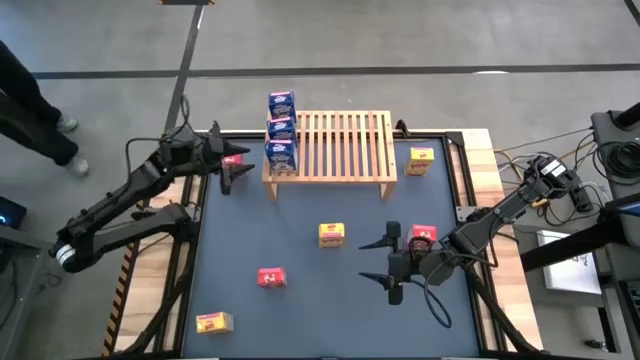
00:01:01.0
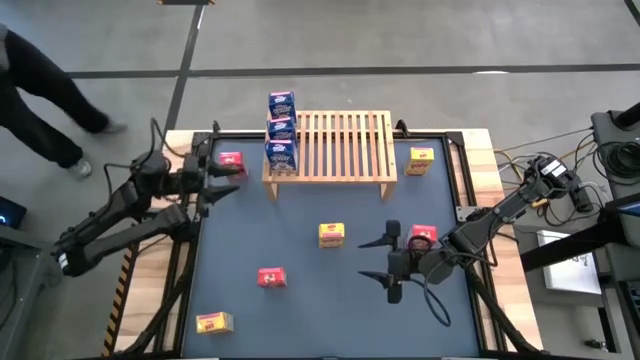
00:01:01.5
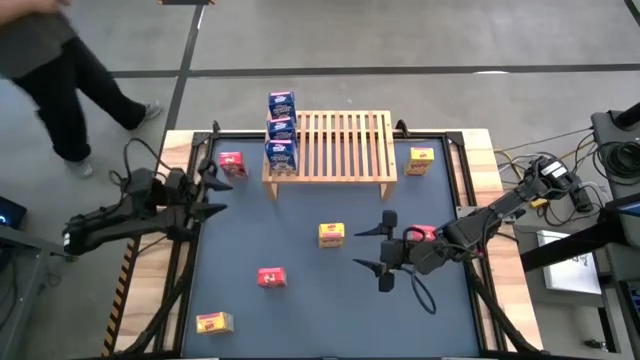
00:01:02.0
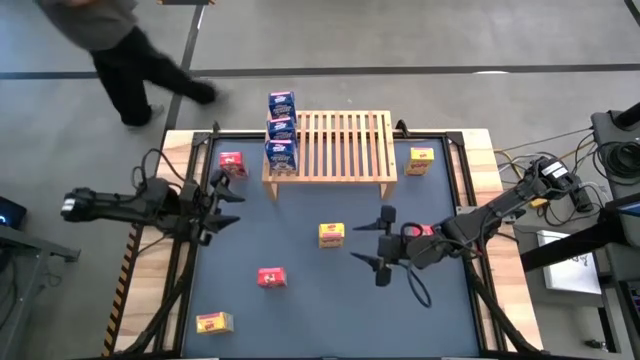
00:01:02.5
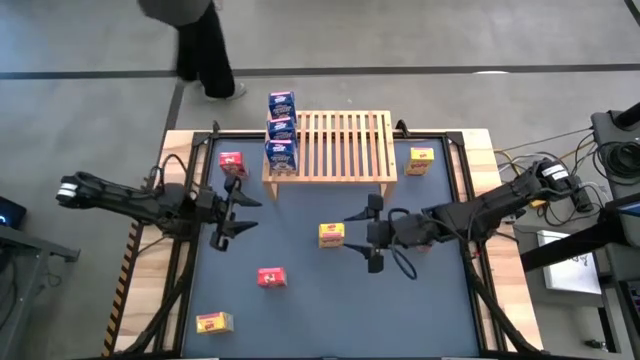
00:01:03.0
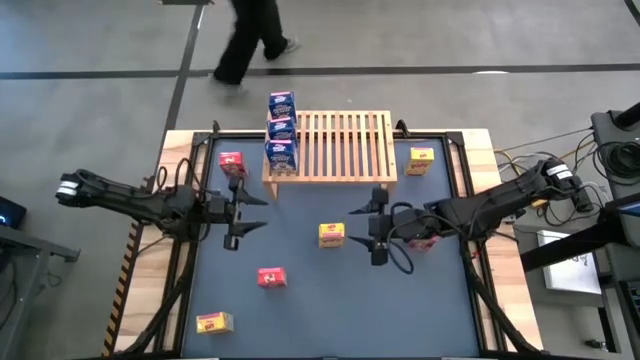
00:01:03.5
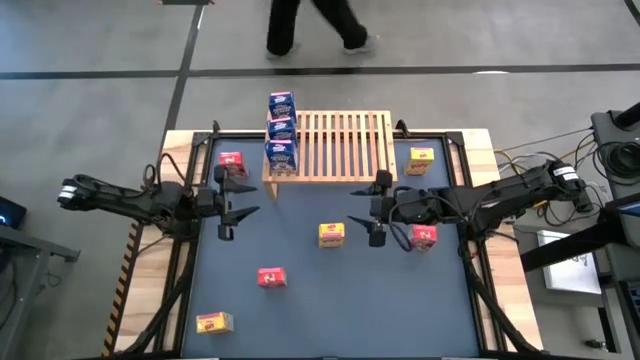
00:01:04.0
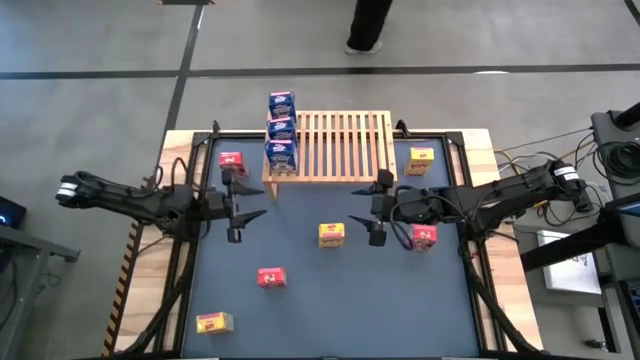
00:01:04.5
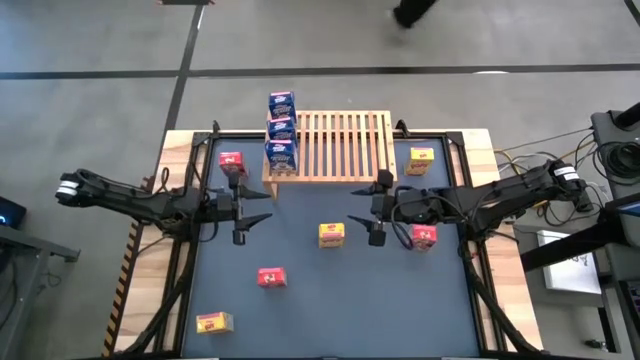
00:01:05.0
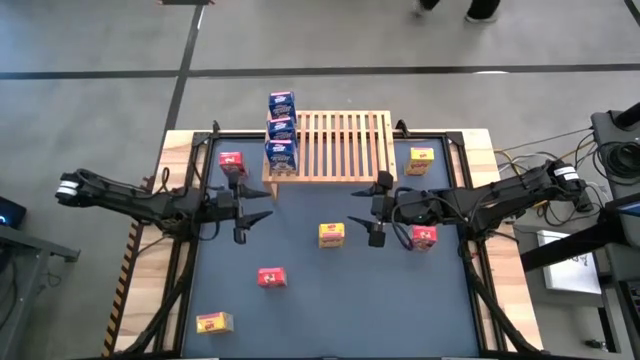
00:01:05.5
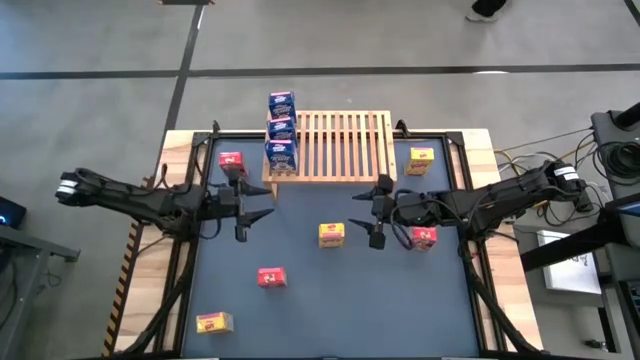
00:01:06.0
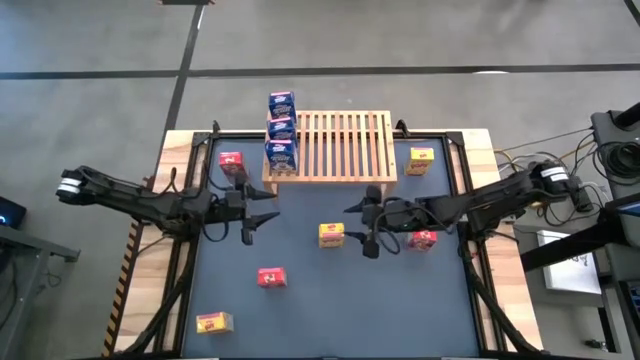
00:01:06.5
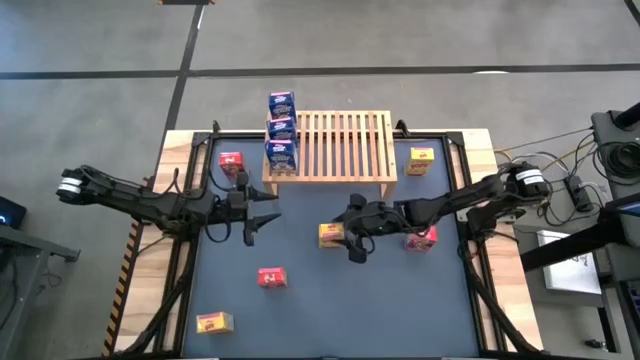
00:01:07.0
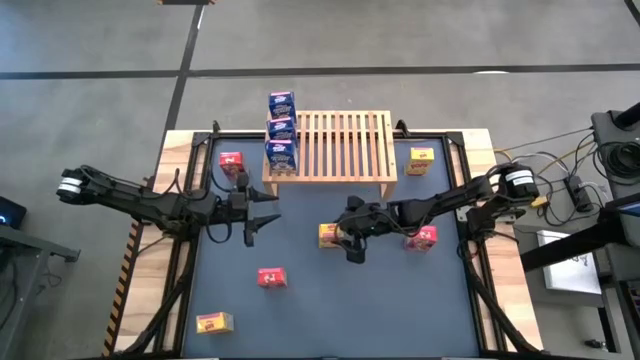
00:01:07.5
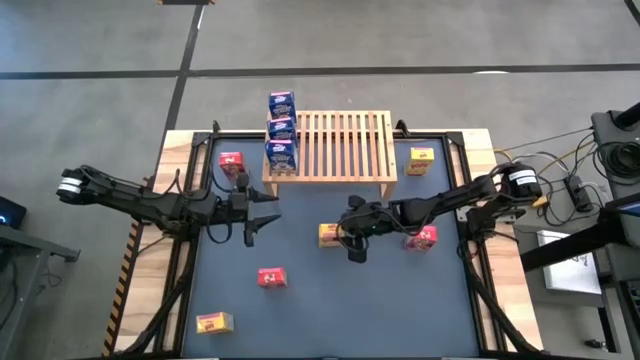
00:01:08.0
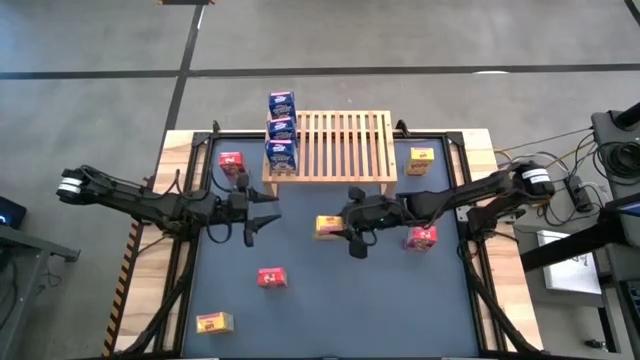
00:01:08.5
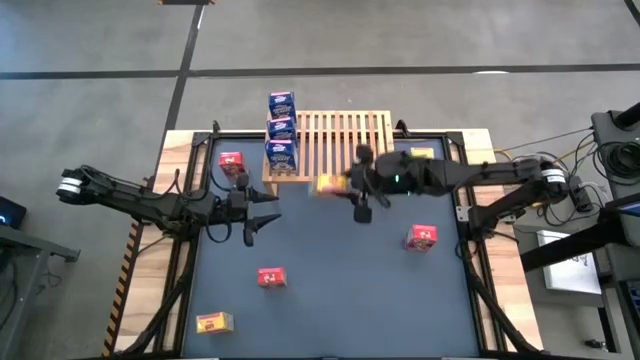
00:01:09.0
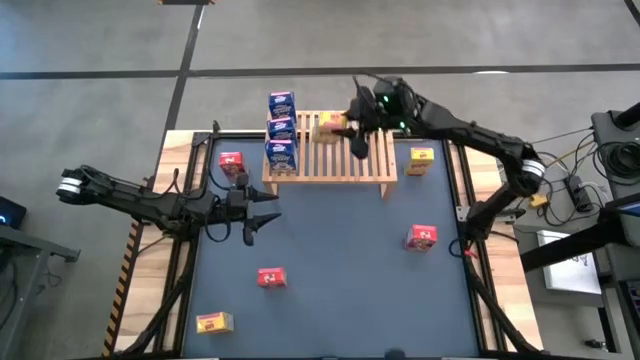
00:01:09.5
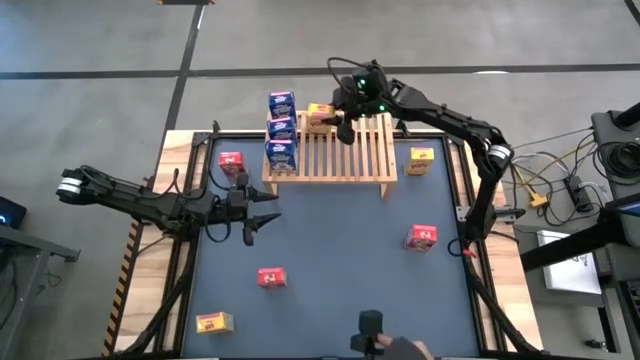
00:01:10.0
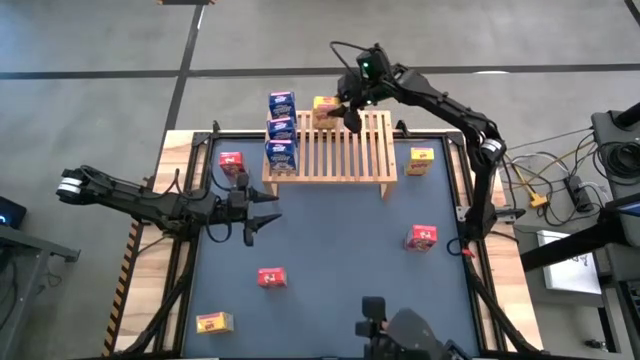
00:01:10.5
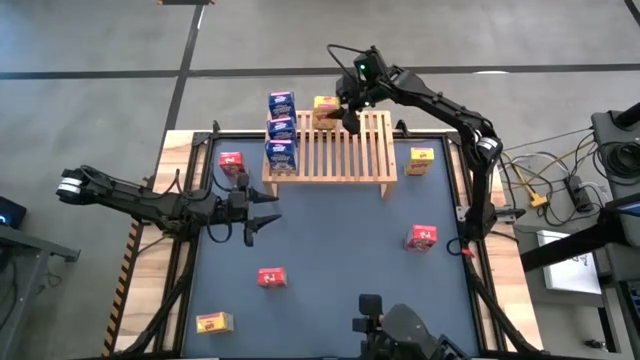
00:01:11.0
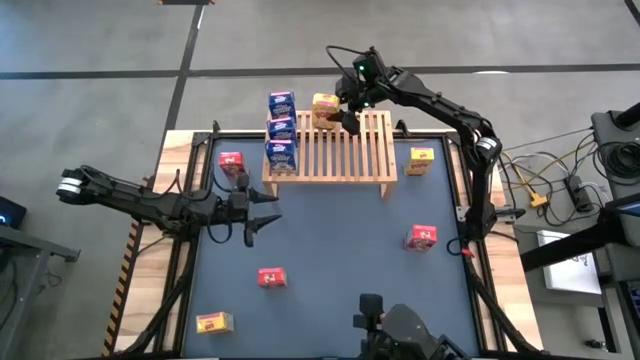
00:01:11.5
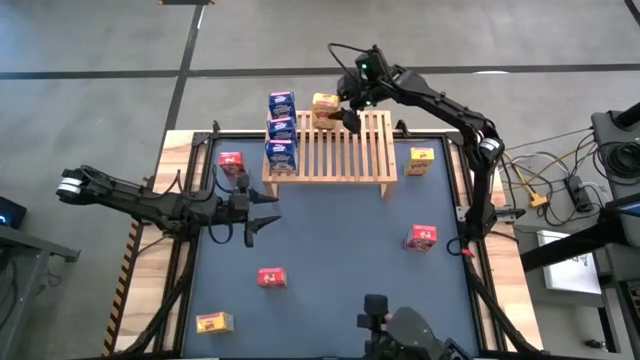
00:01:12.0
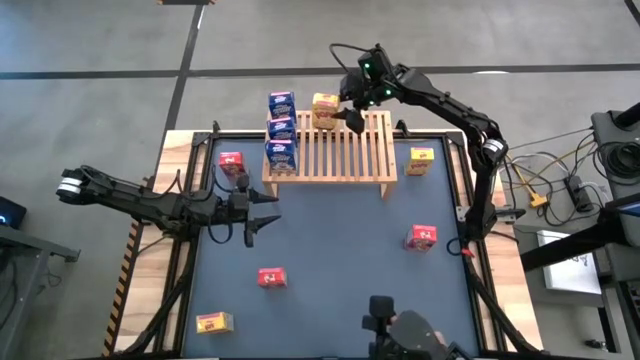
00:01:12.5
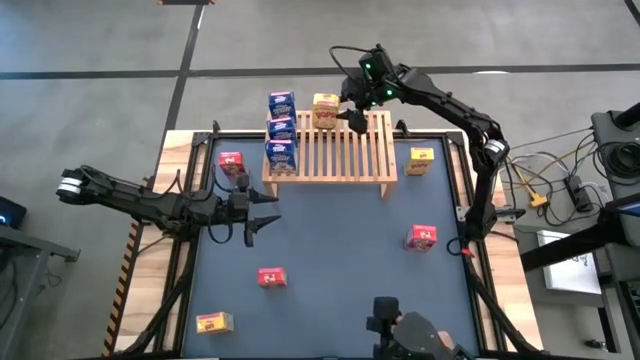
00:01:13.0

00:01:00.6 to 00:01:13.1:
Task: Stack cereal on shelf
Put the middle yellow cereal box on the shelf

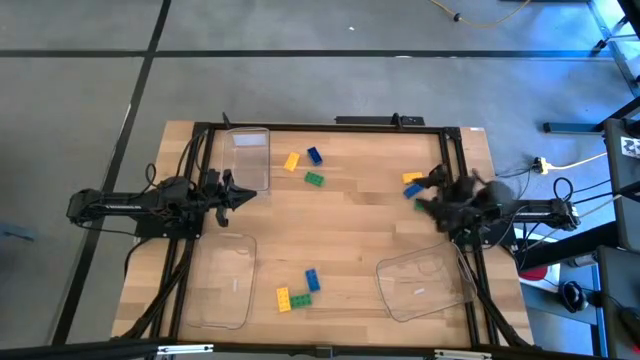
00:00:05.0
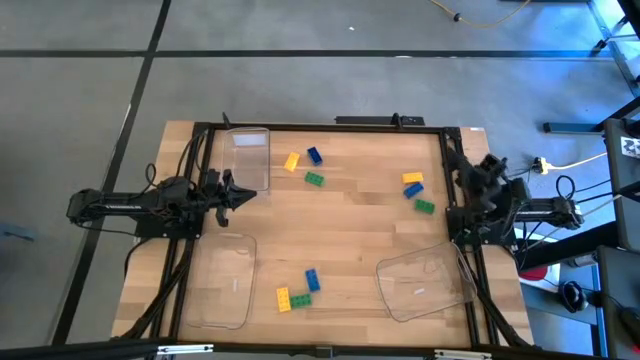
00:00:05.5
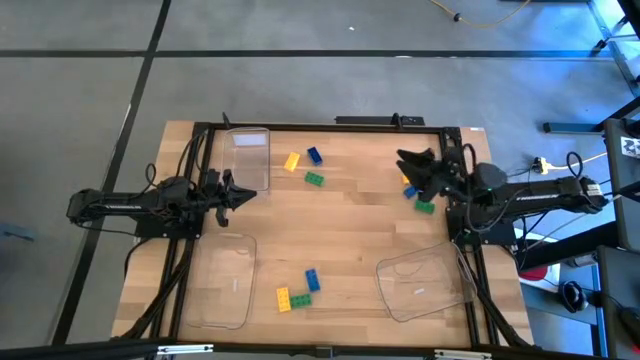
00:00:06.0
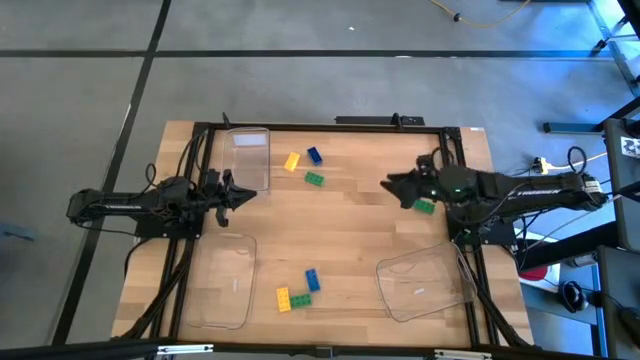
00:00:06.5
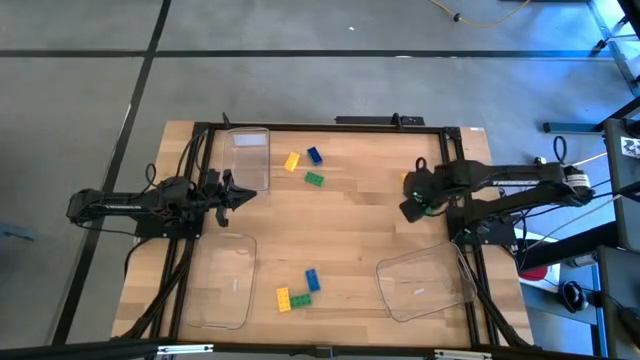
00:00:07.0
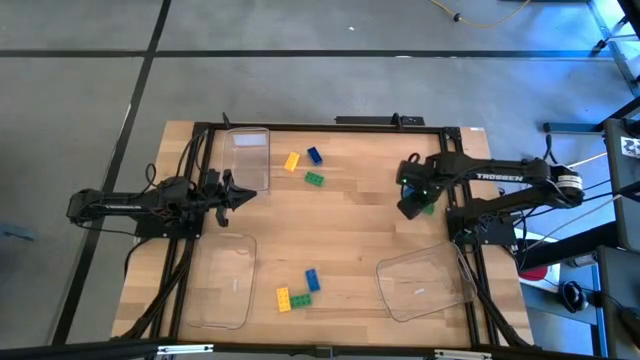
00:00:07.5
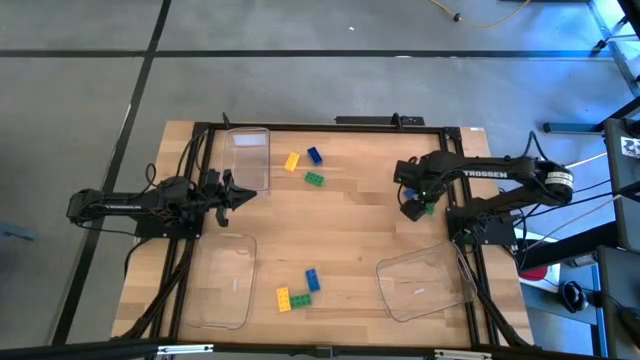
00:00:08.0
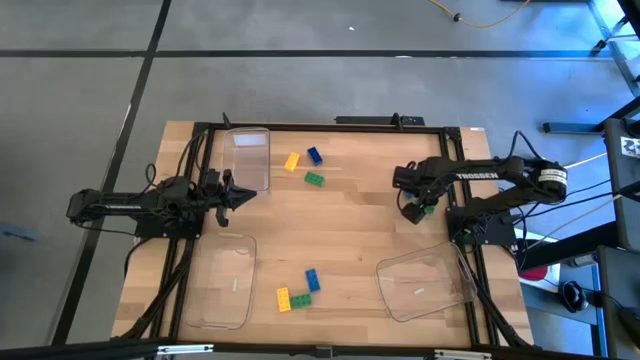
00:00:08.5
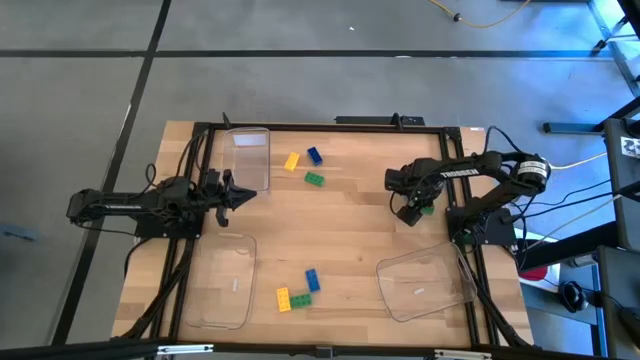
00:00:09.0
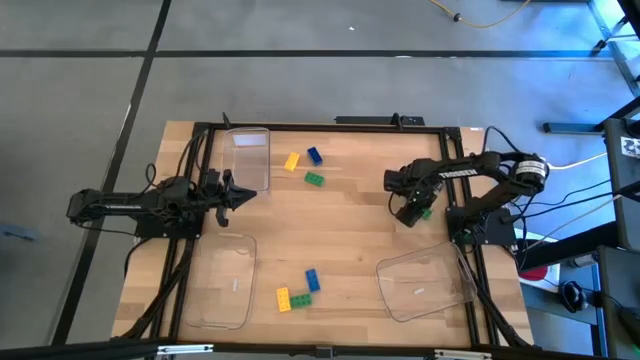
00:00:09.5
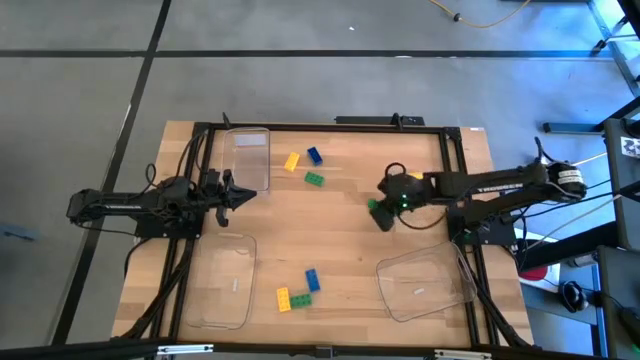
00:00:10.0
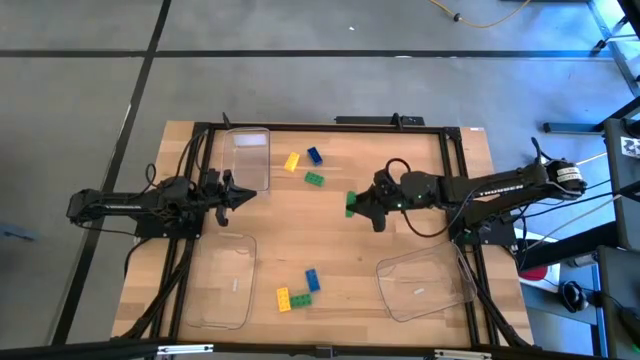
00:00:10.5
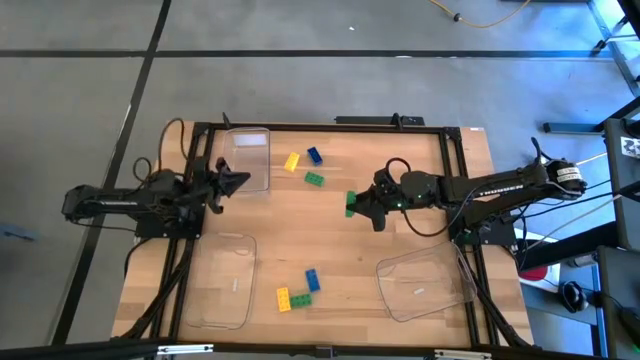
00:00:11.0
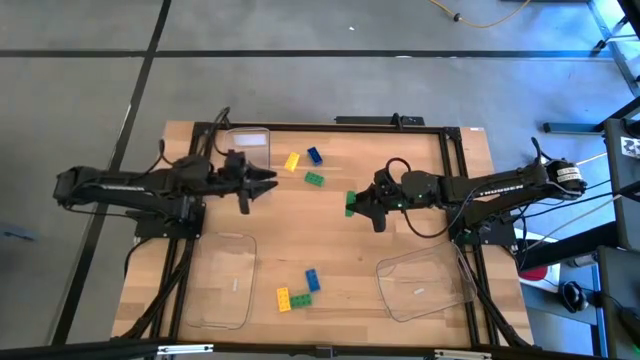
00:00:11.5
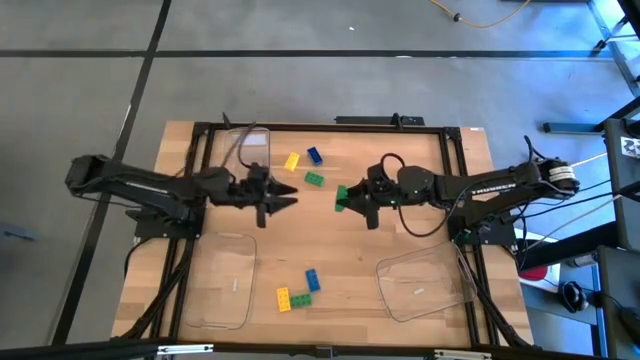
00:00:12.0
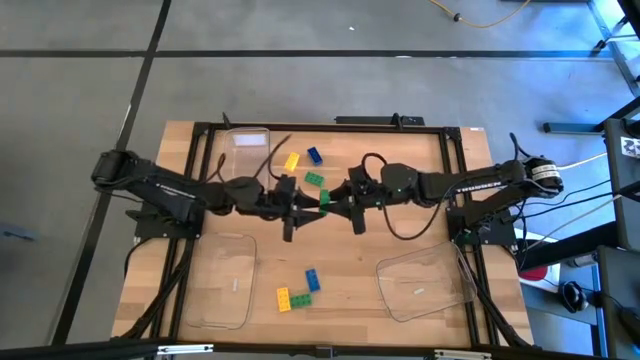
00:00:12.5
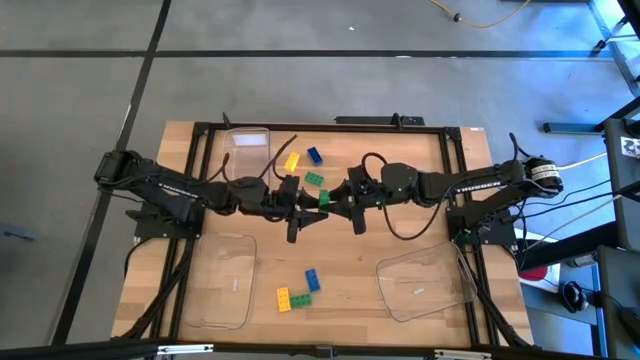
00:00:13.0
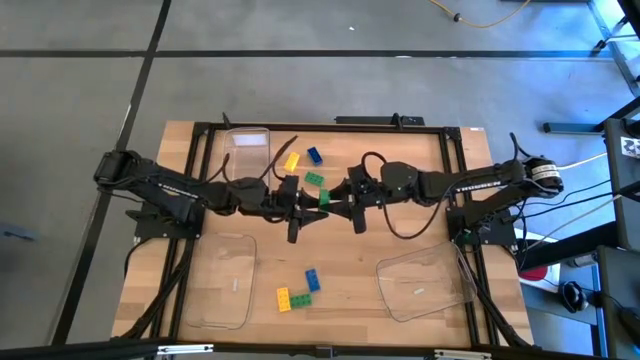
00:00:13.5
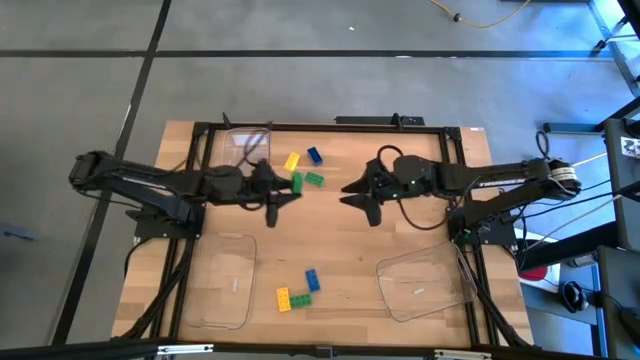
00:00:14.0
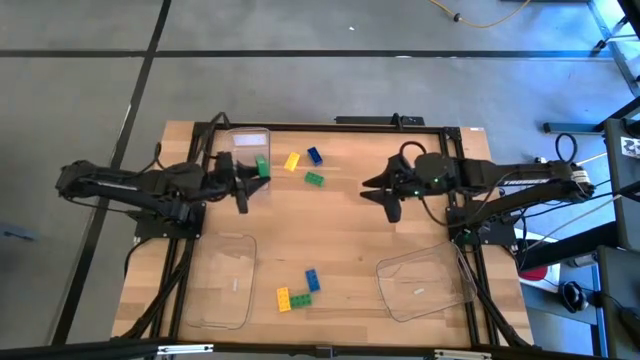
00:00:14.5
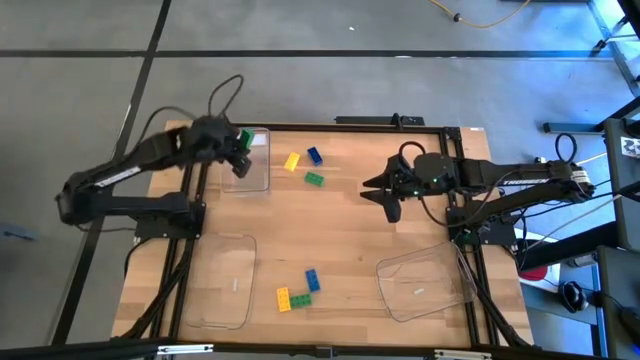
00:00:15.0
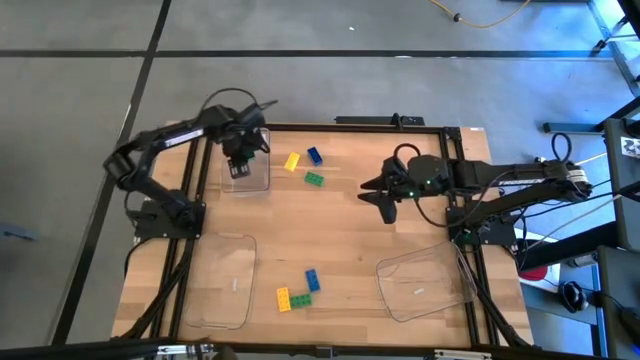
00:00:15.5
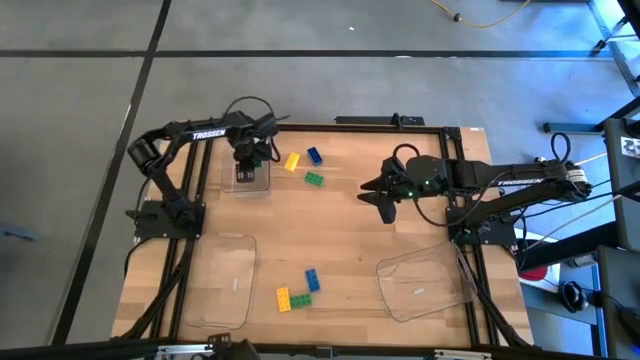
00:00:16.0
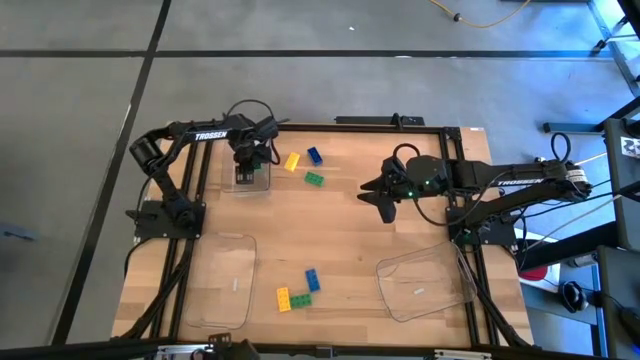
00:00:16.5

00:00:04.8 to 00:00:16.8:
Task: Sort & place blocks by color
Put the top right green game piece into the top left transparent bin
